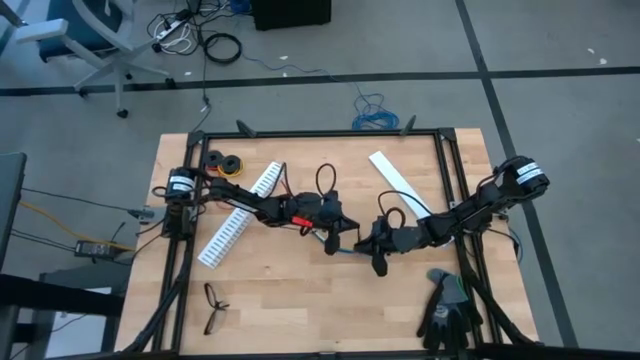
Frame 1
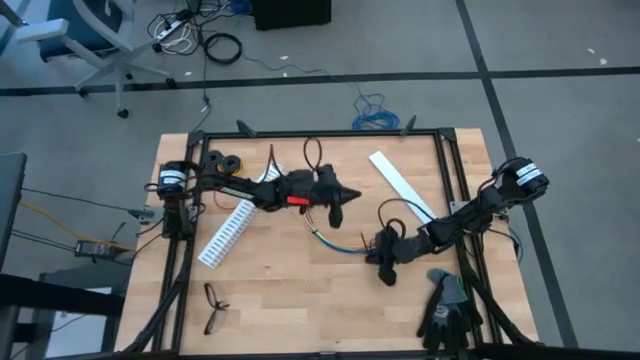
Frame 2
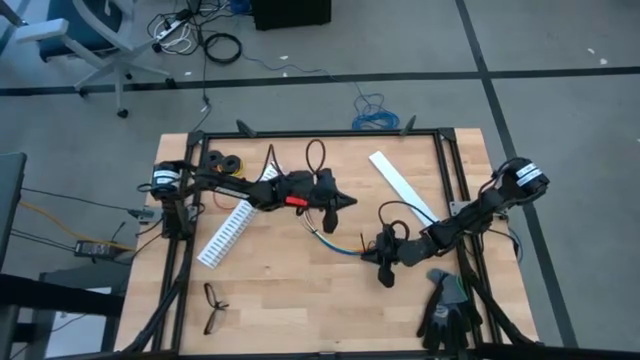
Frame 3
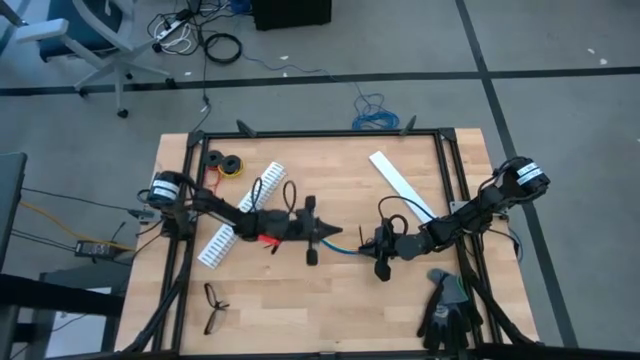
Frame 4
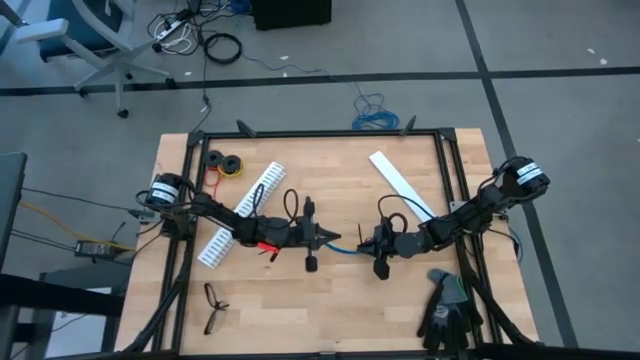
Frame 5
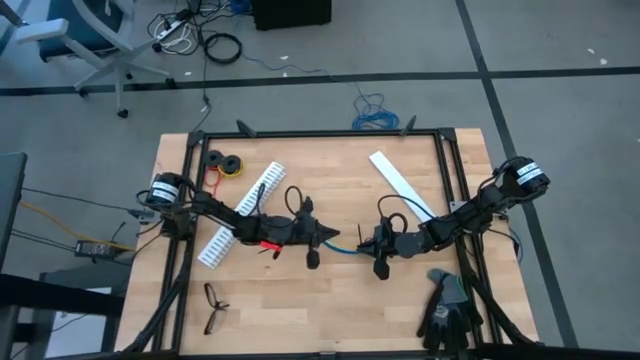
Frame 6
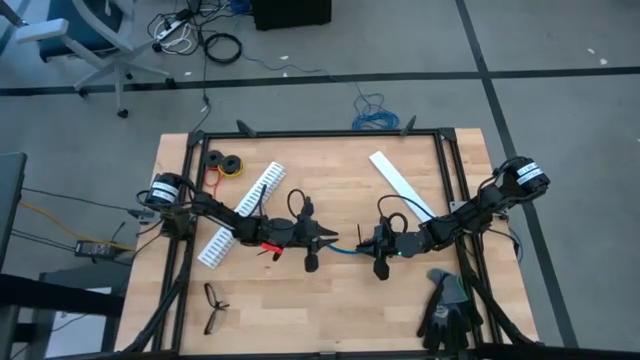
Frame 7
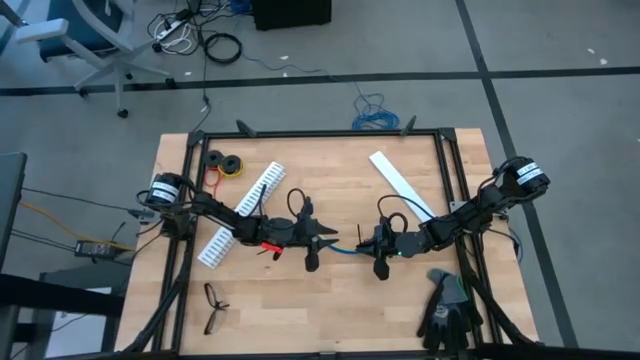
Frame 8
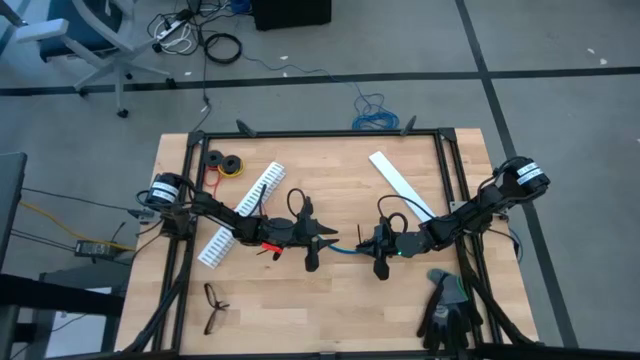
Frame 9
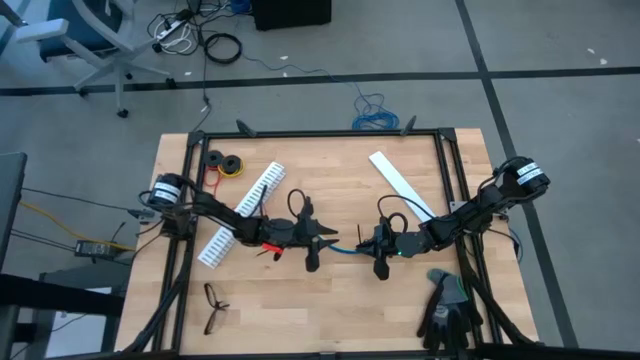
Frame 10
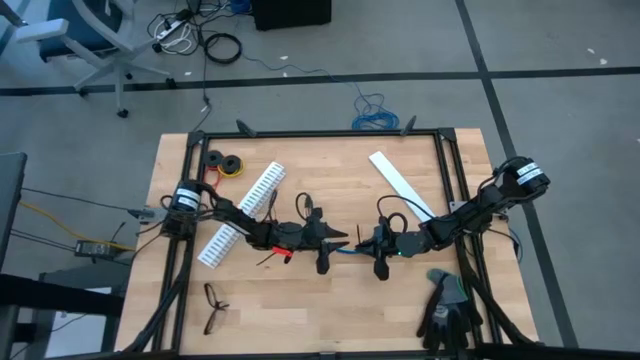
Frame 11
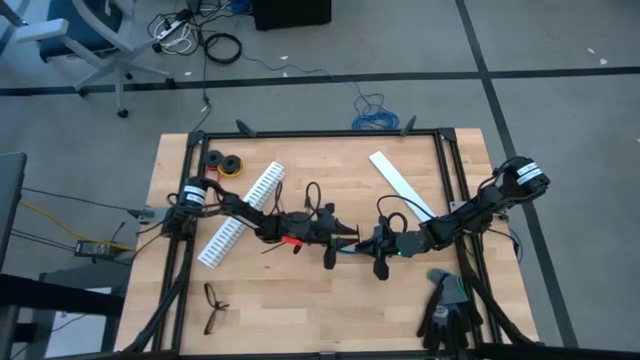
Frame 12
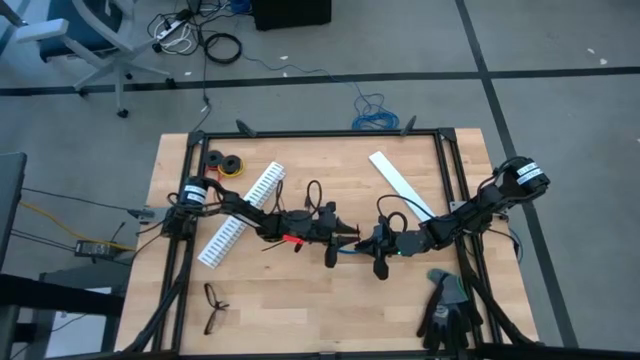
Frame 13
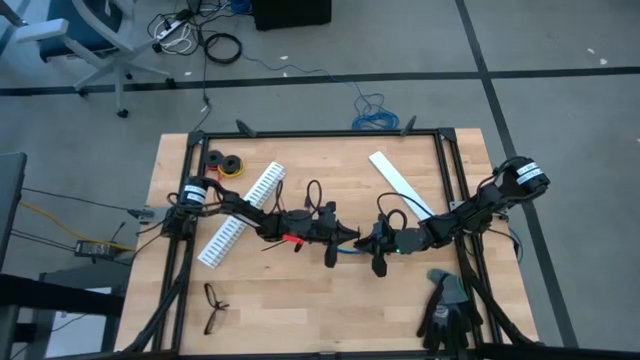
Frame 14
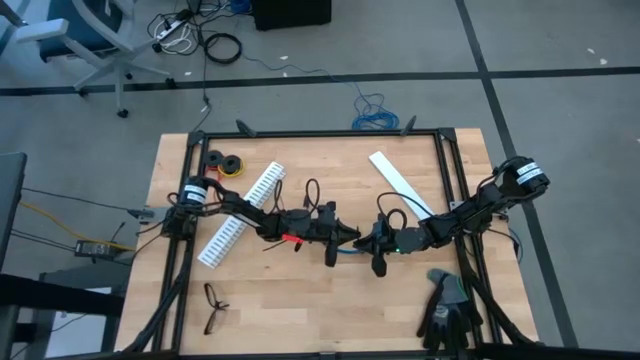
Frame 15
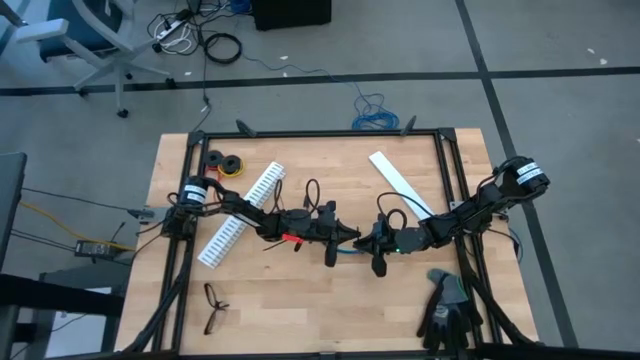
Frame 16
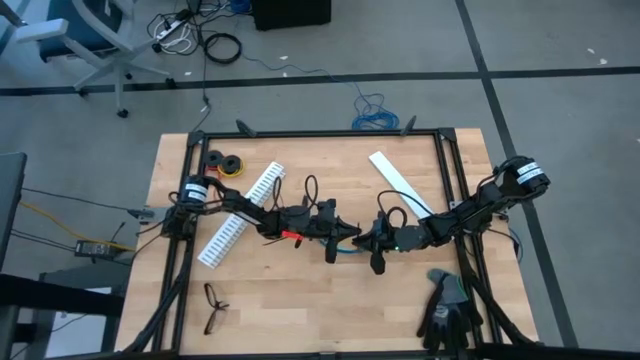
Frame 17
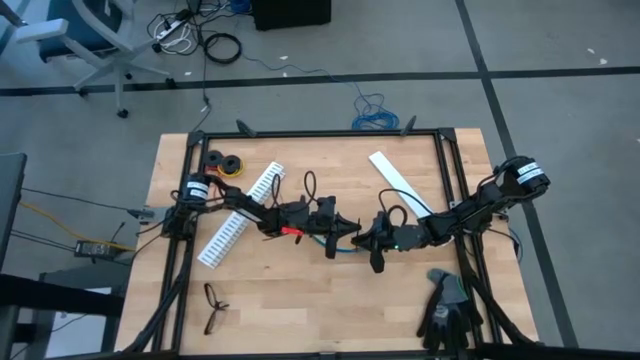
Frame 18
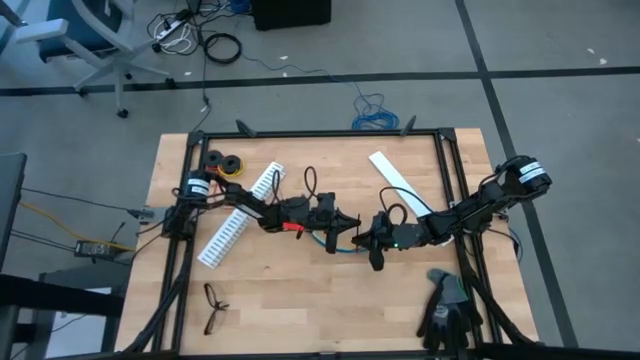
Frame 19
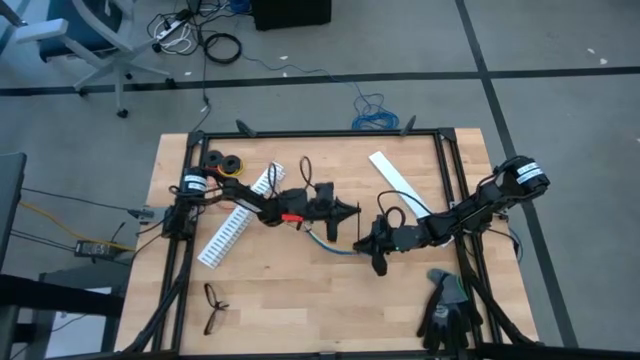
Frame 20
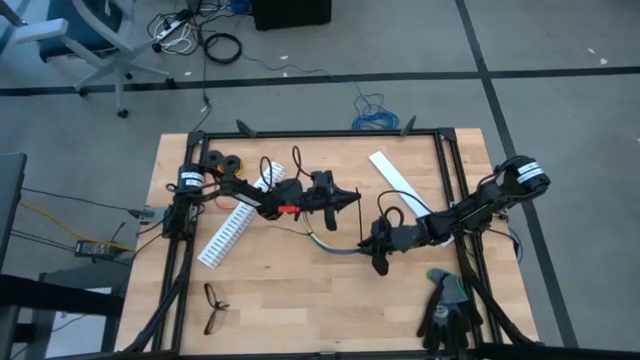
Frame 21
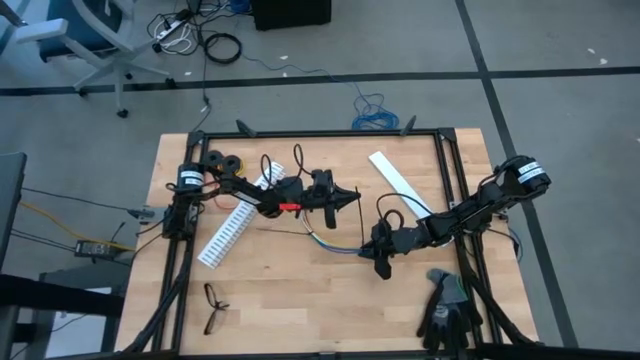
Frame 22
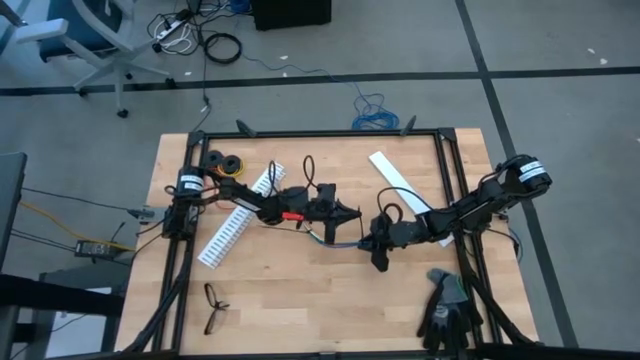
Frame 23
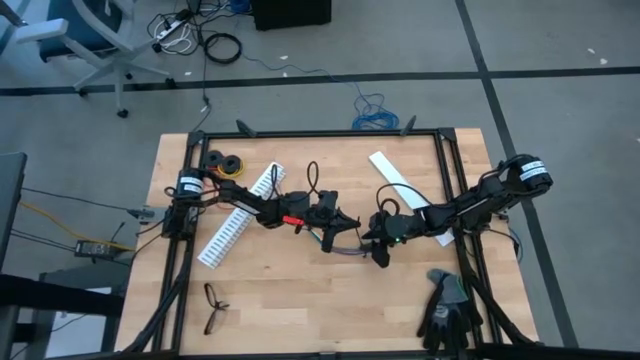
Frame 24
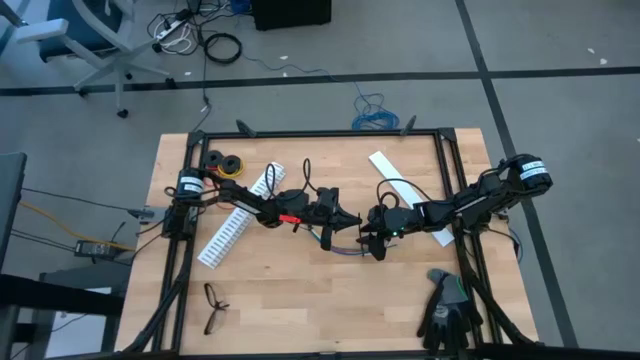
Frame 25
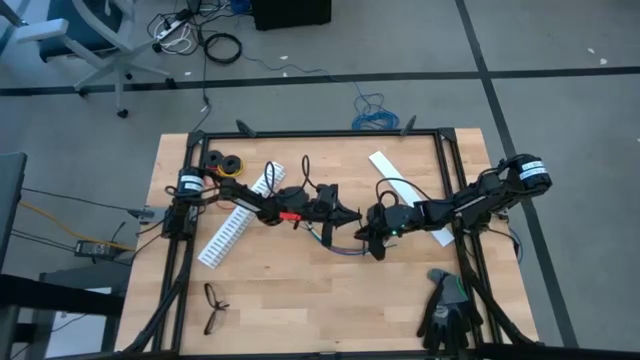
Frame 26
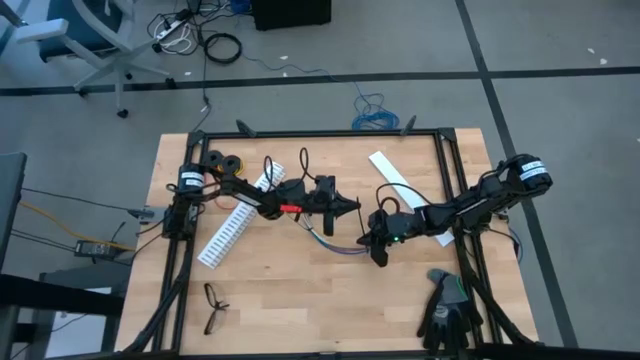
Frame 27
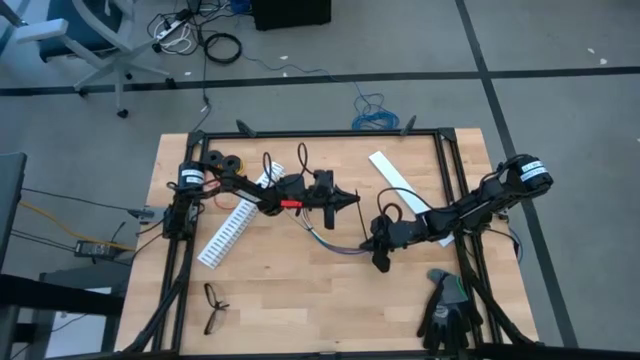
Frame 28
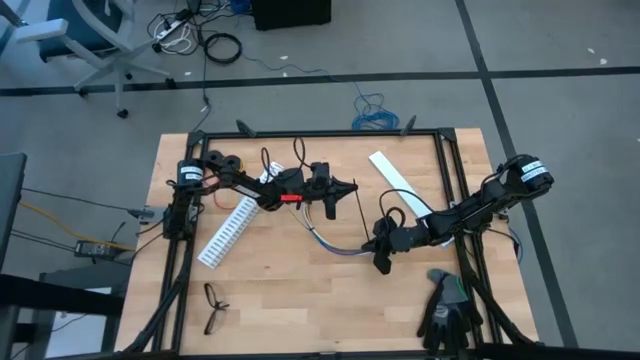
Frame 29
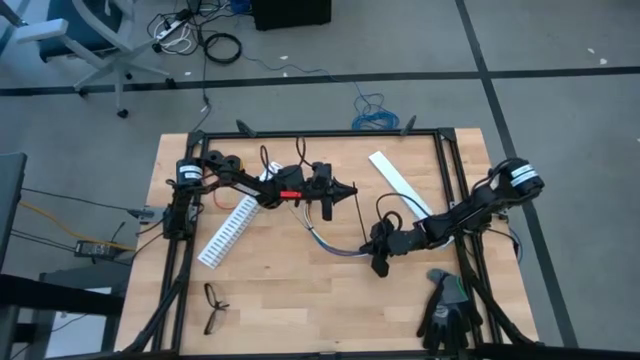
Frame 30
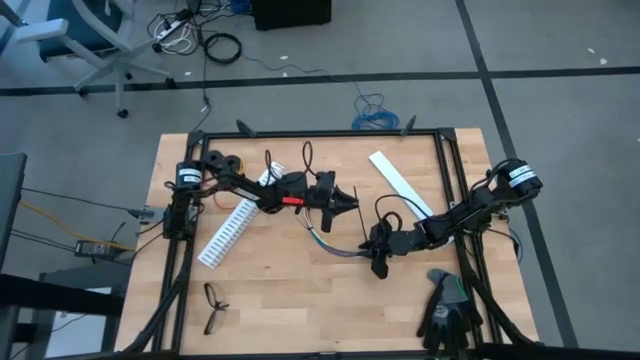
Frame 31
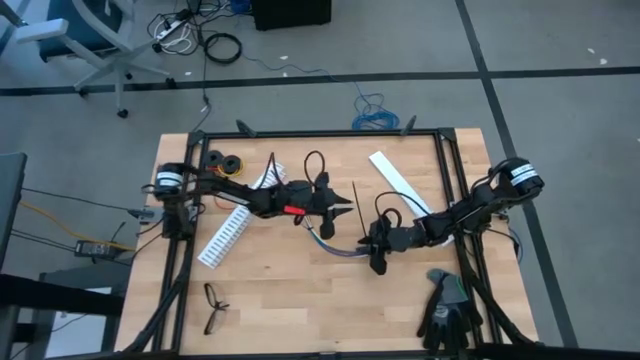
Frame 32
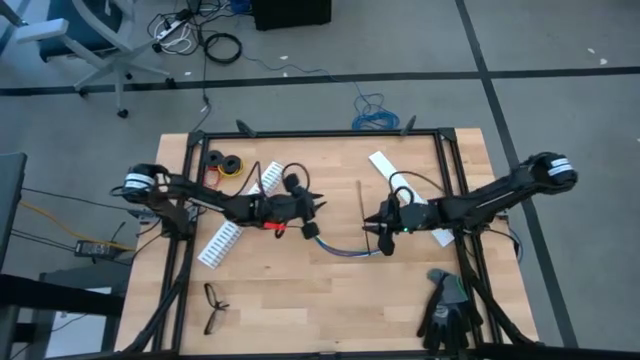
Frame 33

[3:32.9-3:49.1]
Task: Ziptie cables
Wrap the cable wires with the black zip tie

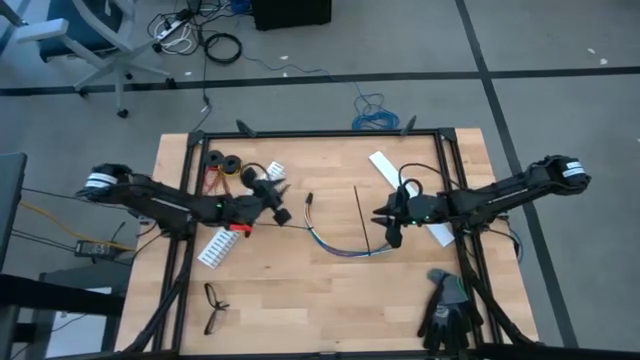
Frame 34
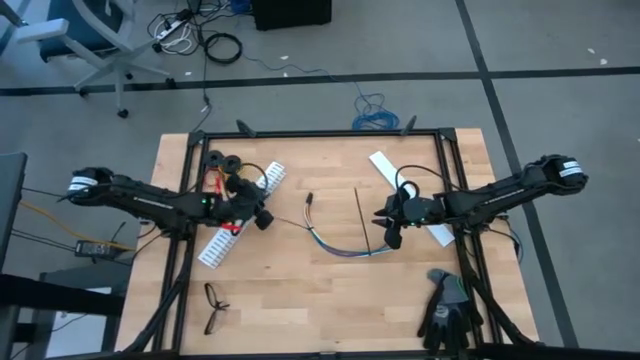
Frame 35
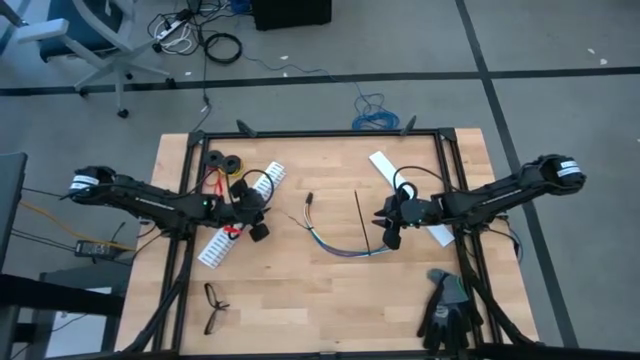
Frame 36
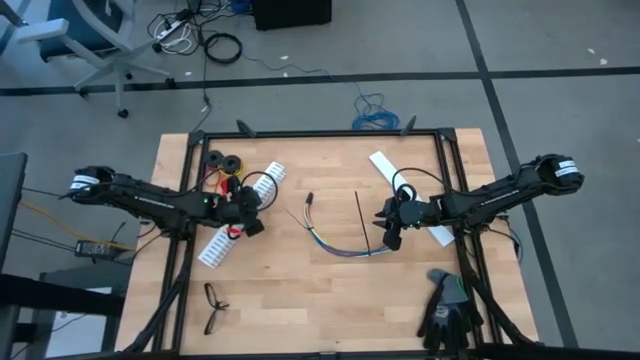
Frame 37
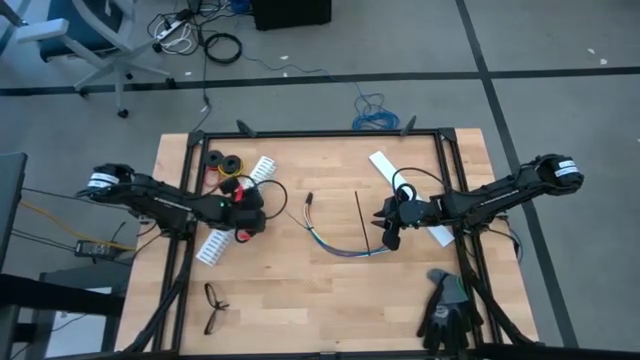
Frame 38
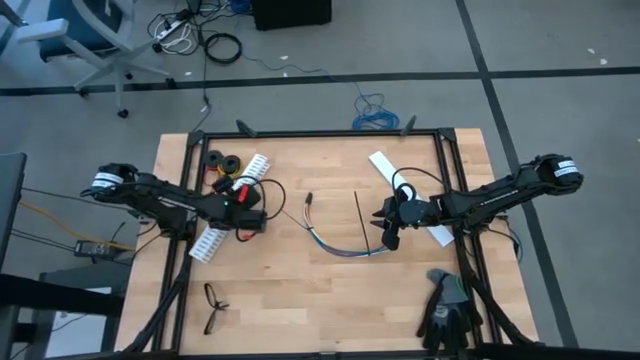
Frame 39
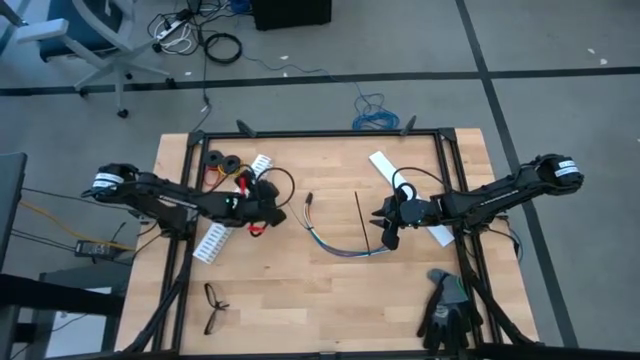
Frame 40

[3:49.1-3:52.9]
Prepare the white cable duct

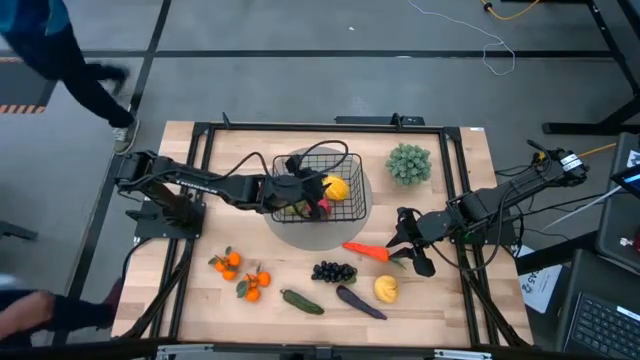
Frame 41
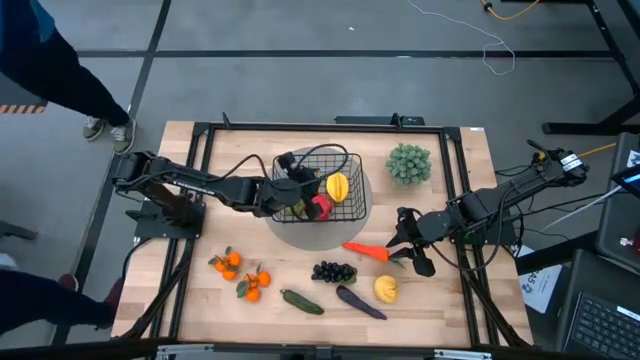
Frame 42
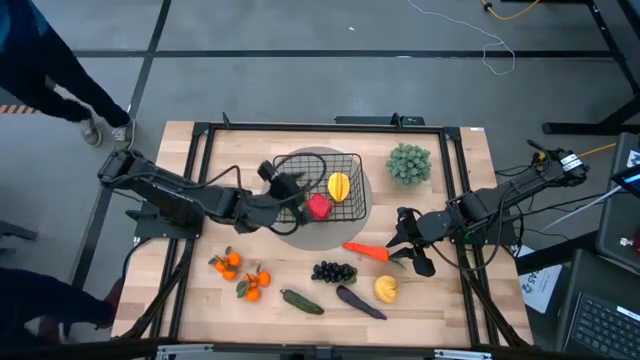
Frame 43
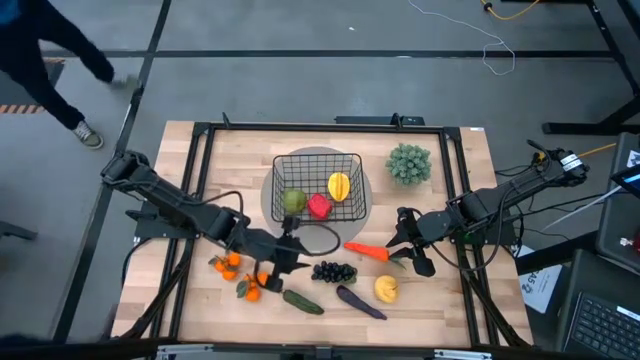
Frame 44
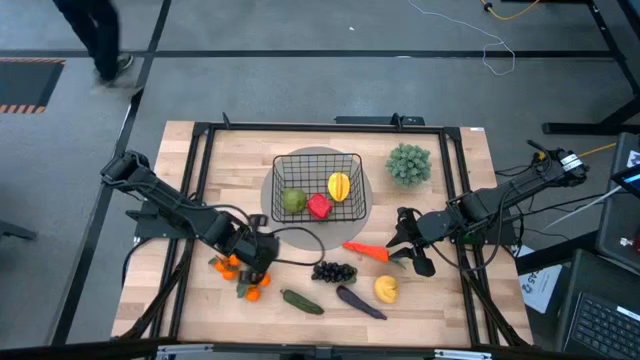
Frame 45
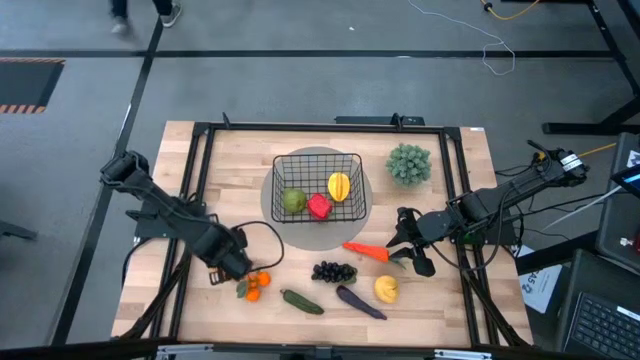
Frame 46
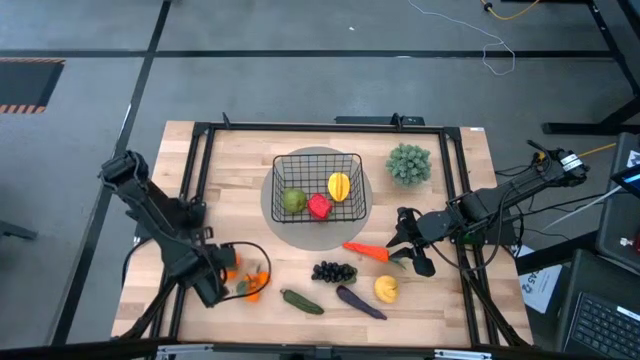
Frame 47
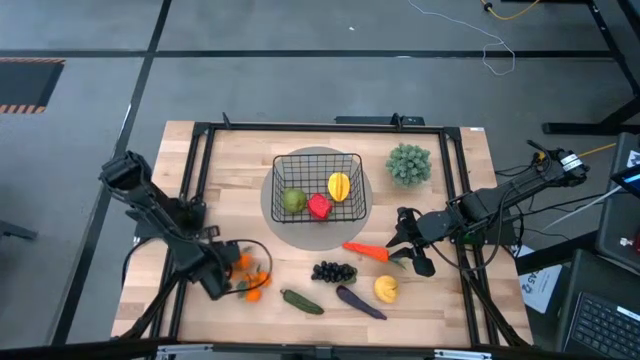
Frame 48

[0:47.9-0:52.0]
Task: Build produce basket
Adjust the left tangerine
